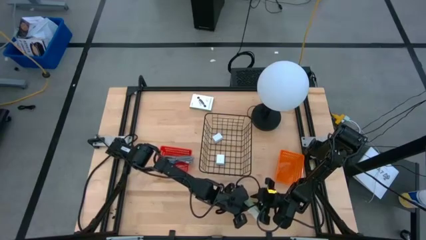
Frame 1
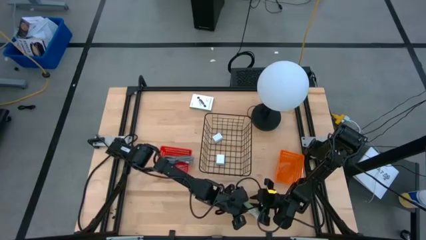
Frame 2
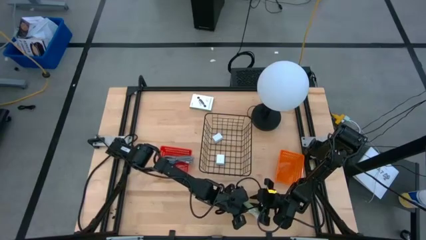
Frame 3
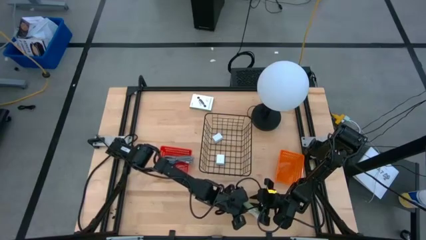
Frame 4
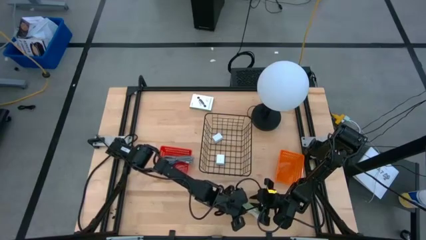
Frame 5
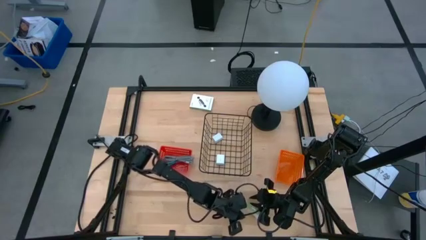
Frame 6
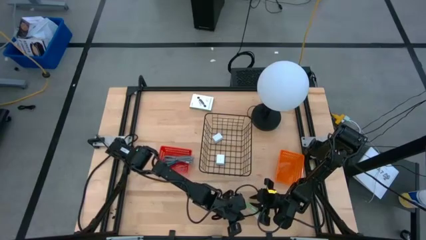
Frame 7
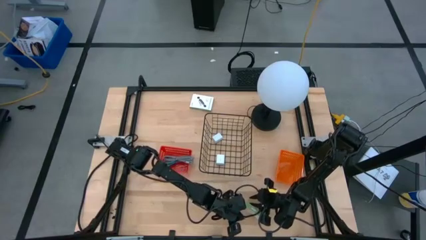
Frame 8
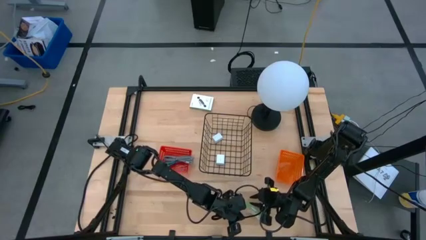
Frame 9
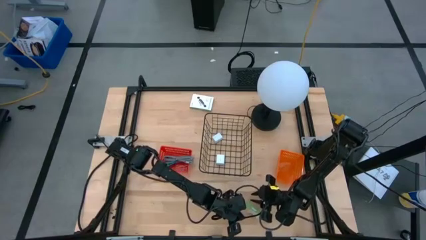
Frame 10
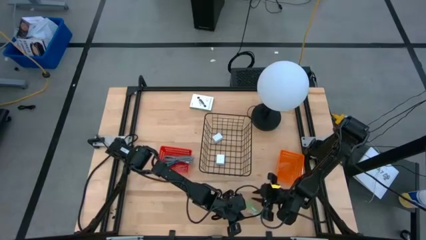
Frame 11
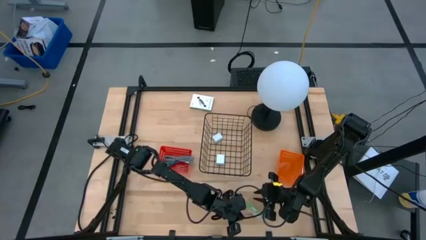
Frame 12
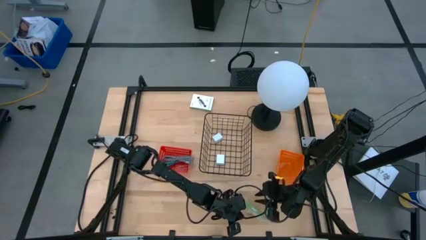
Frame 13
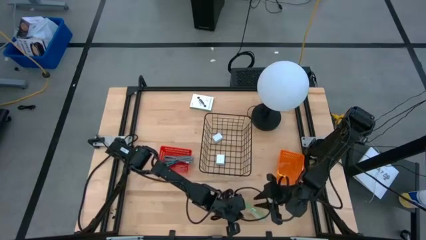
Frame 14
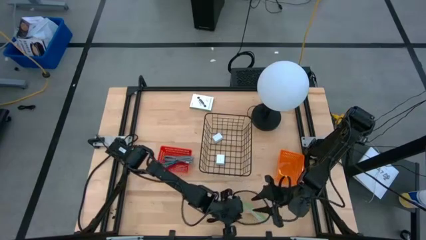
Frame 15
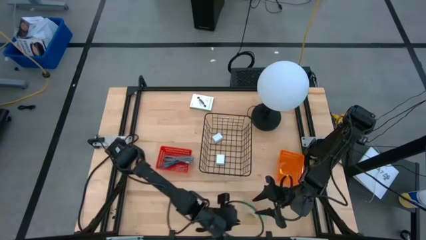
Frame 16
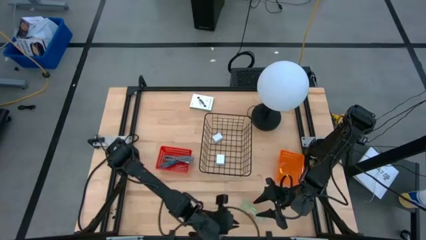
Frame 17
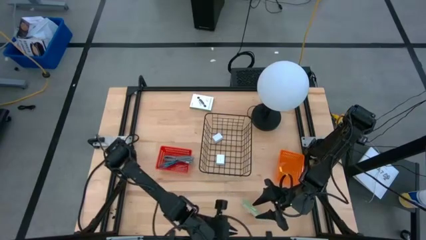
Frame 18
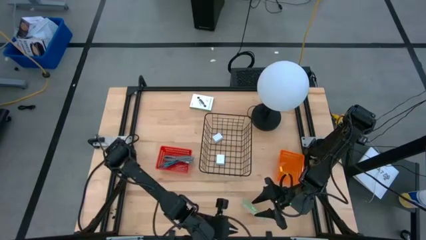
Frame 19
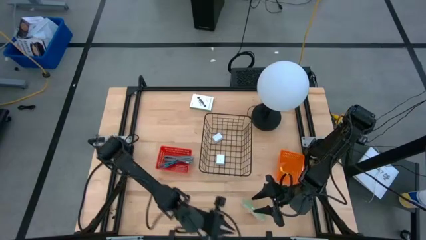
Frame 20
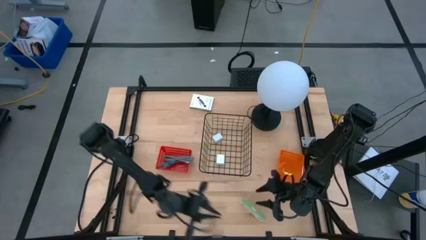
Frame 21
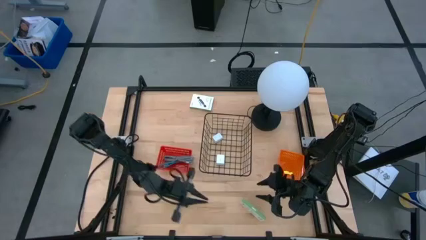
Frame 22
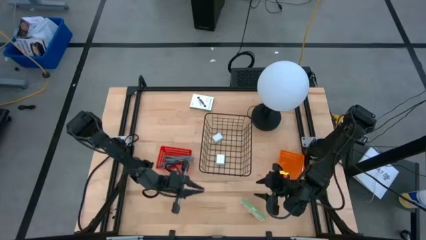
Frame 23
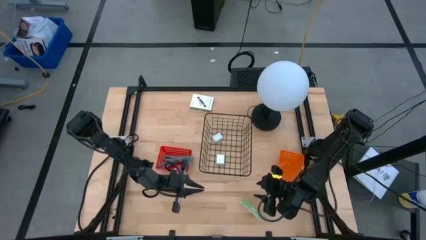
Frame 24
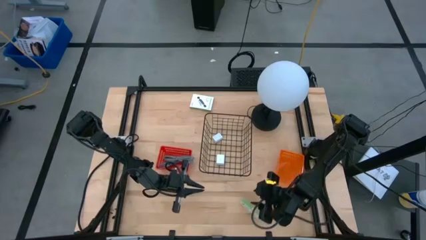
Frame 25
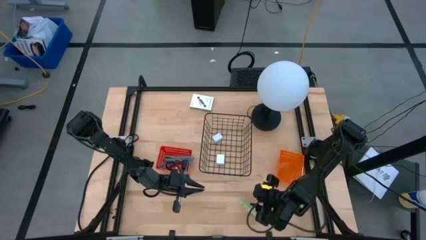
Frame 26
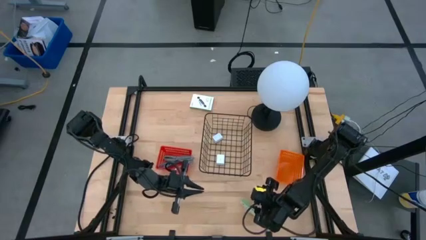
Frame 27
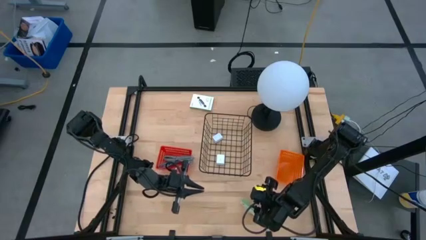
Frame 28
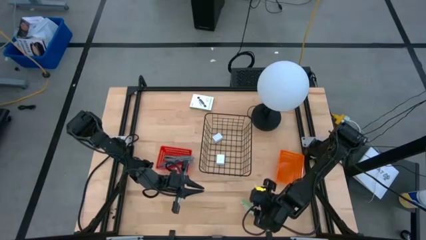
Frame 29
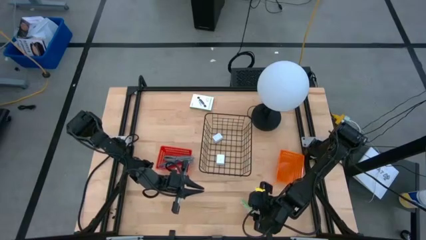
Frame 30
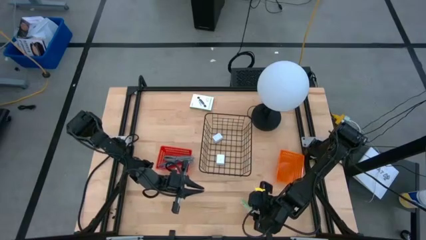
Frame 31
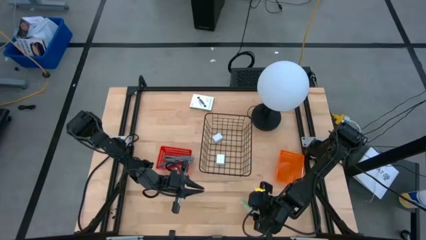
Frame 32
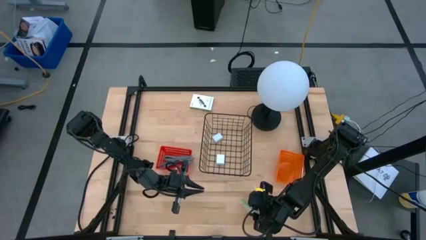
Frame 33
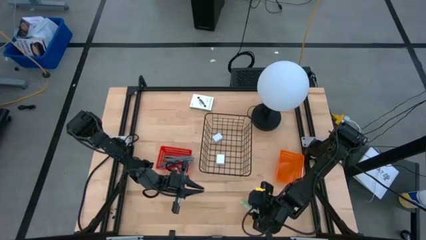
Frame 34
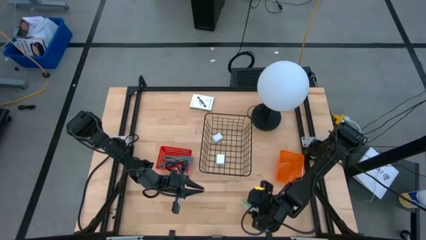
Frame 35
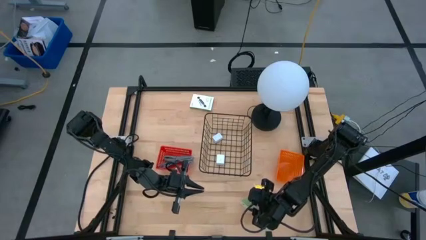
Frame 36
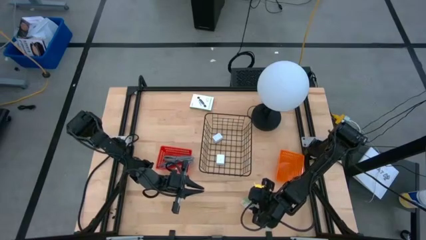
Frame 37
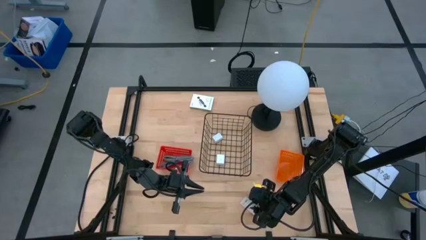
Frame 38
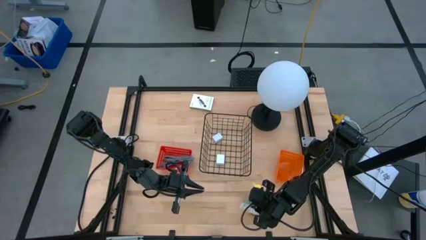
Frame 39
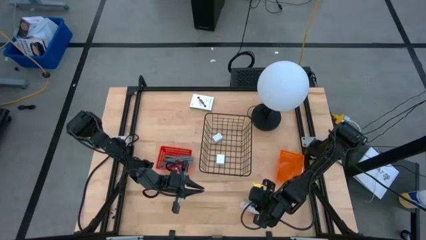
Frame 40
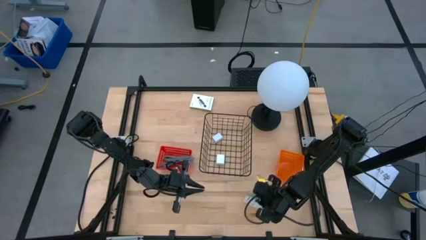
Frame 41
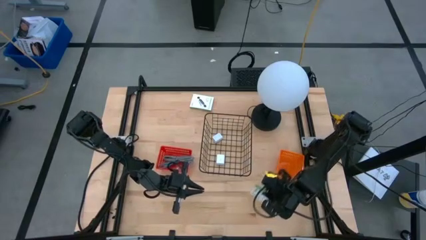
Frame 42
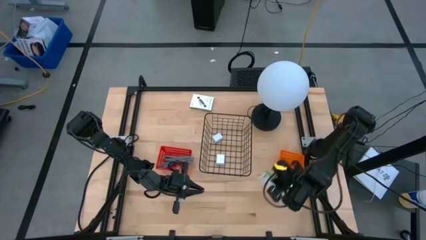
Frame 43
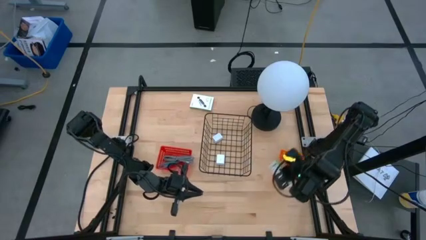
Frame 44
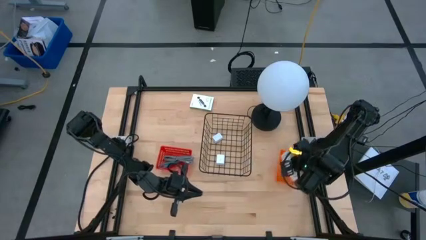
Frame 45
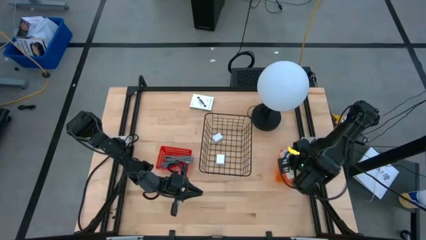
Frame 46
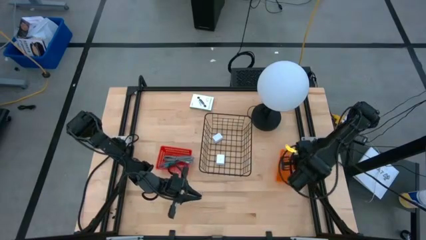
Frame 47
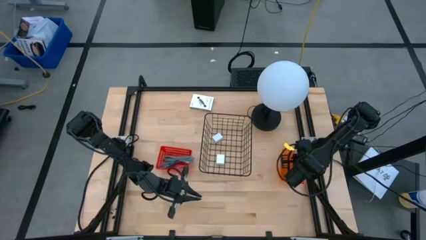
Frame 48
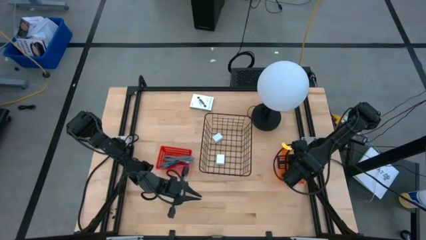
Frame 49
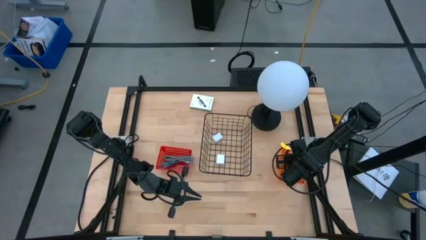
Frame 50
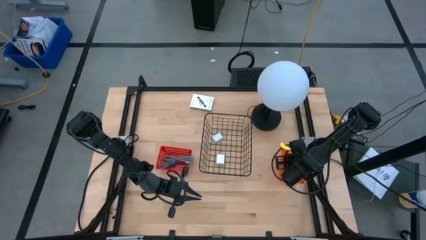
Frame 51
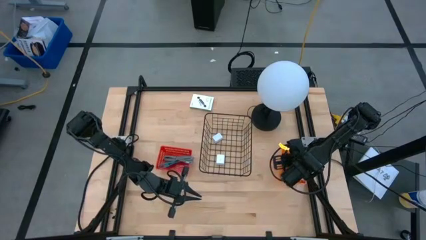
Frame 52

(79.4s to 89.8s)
Task: Pick and place items into bin
Put the bottom card reader box into the orange basket
